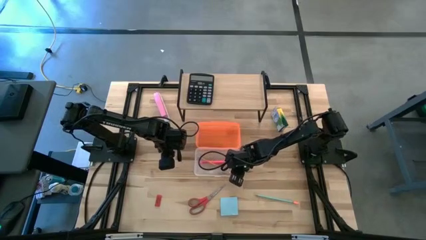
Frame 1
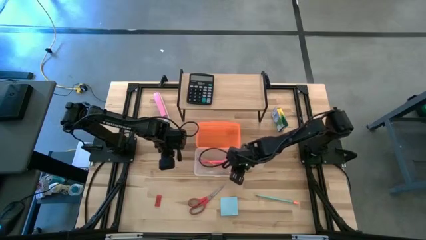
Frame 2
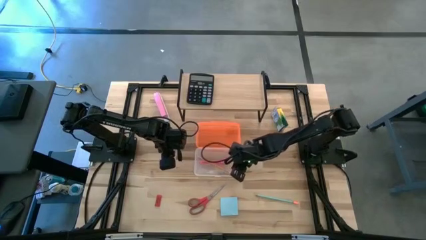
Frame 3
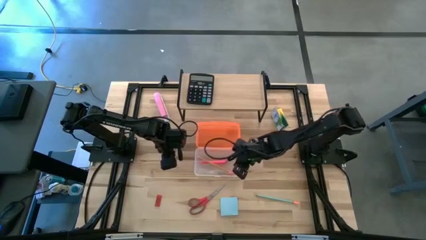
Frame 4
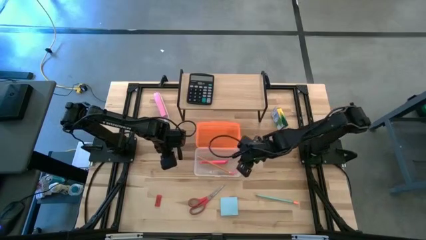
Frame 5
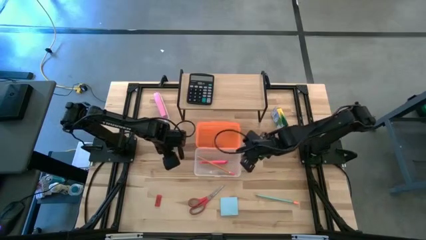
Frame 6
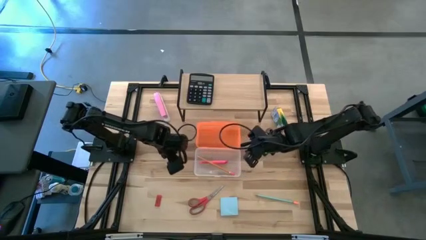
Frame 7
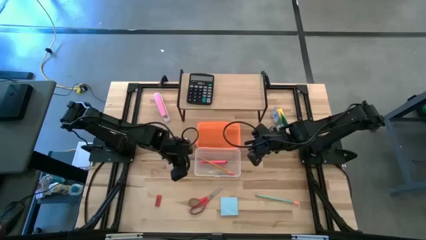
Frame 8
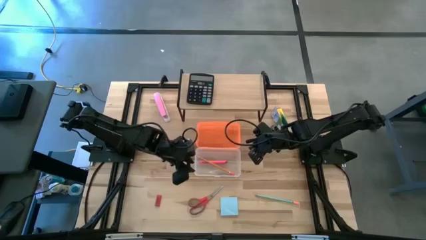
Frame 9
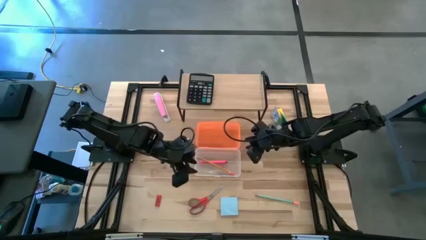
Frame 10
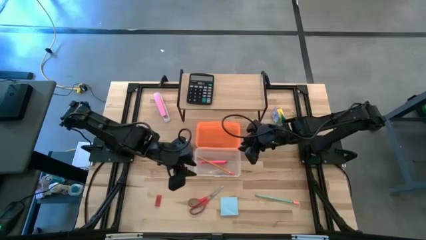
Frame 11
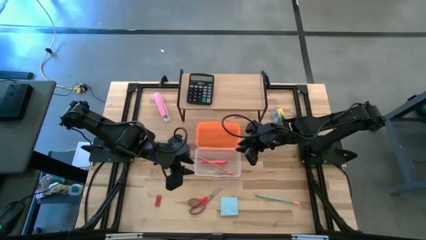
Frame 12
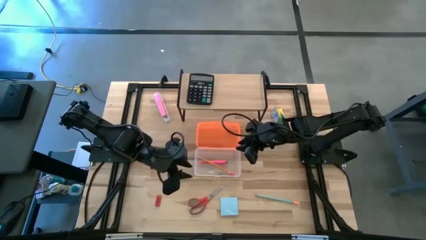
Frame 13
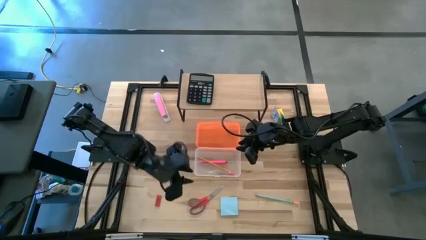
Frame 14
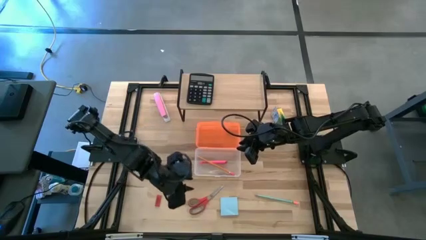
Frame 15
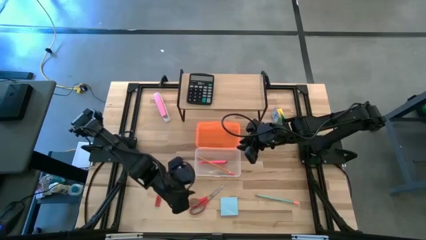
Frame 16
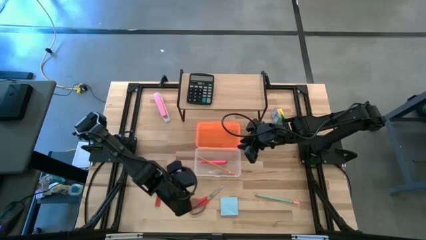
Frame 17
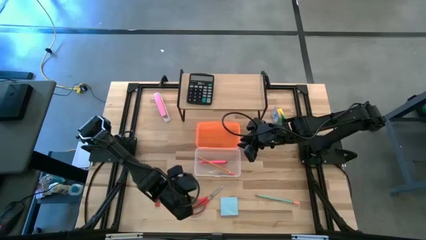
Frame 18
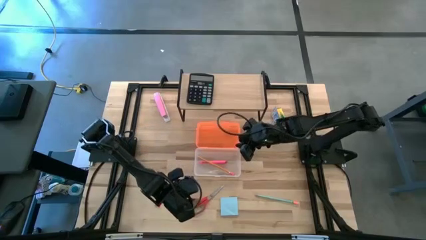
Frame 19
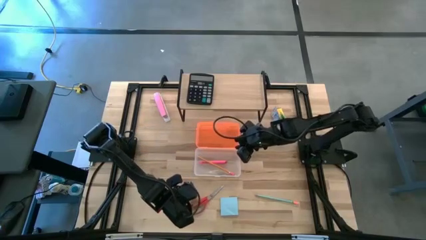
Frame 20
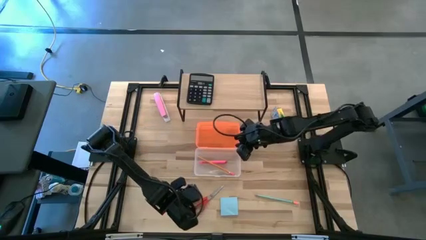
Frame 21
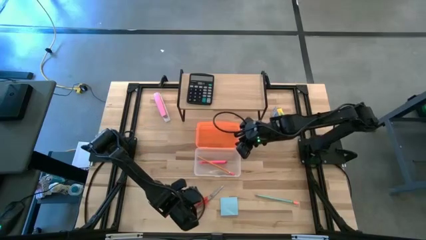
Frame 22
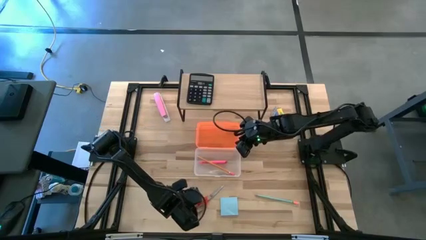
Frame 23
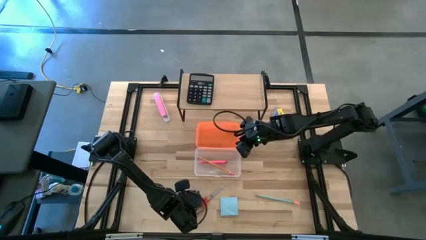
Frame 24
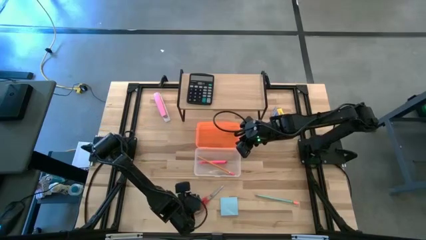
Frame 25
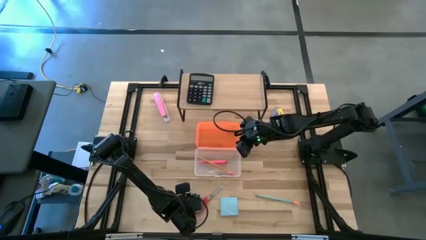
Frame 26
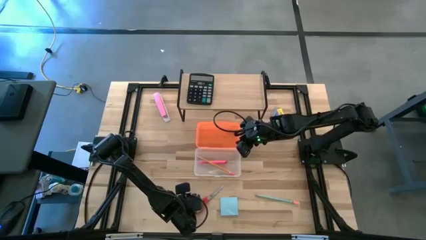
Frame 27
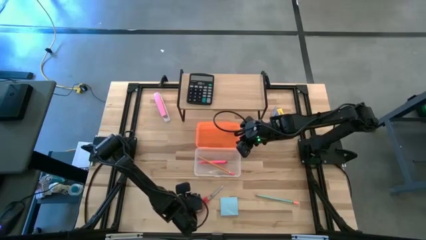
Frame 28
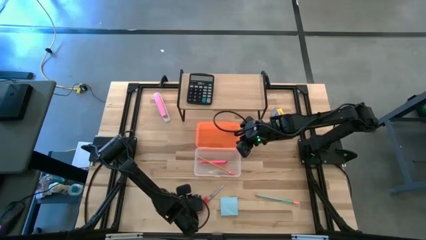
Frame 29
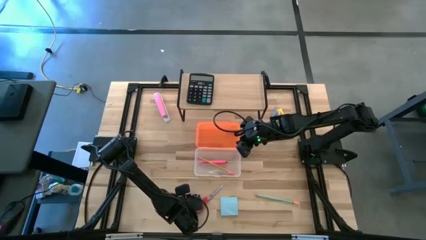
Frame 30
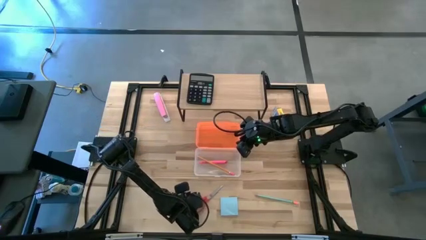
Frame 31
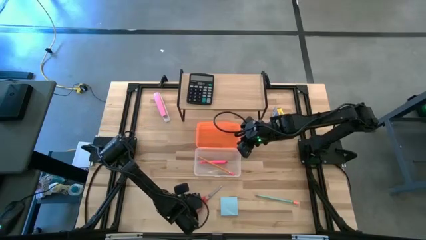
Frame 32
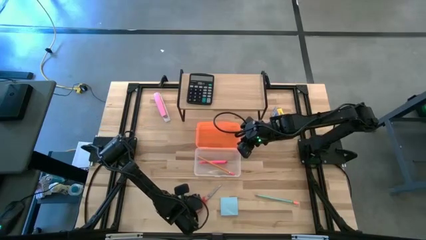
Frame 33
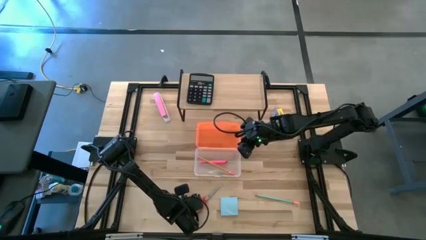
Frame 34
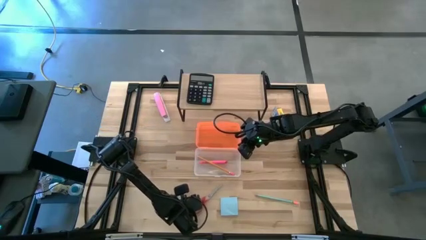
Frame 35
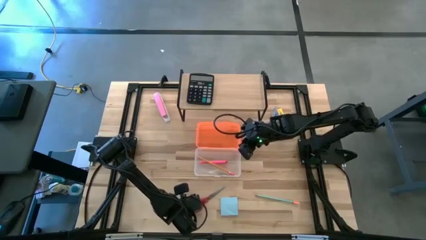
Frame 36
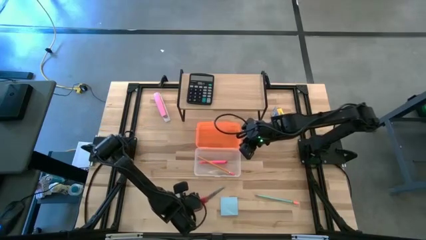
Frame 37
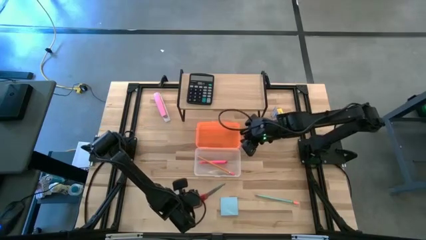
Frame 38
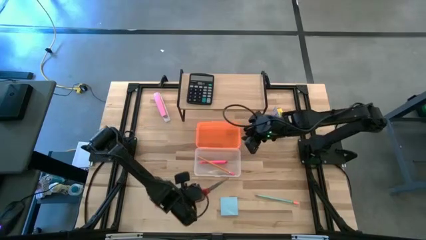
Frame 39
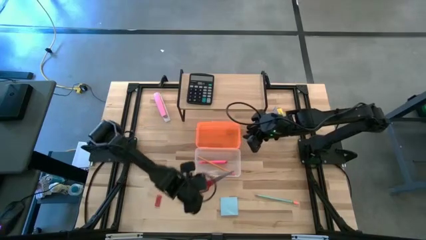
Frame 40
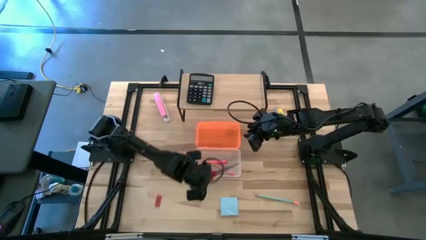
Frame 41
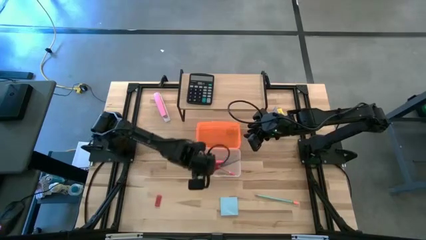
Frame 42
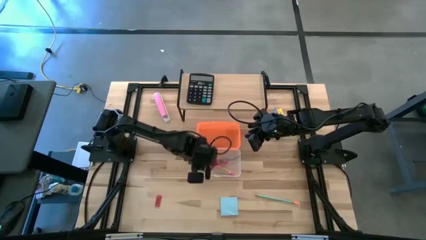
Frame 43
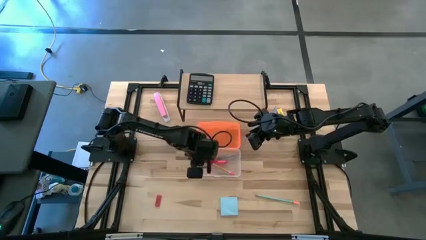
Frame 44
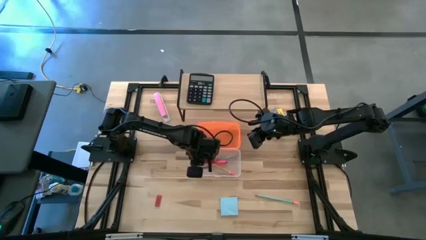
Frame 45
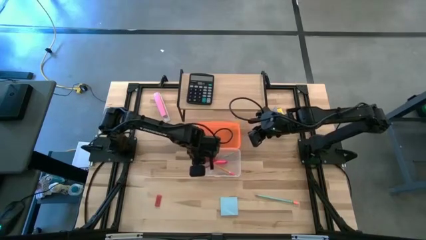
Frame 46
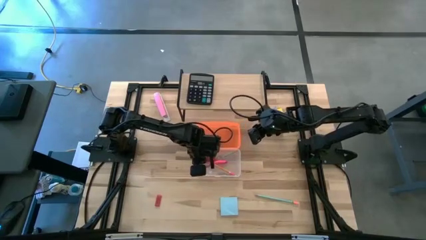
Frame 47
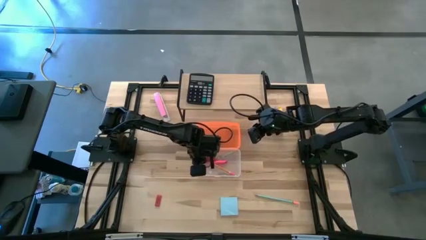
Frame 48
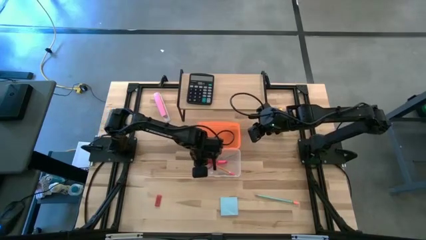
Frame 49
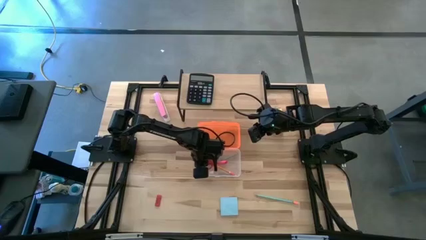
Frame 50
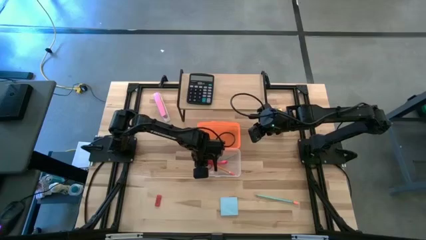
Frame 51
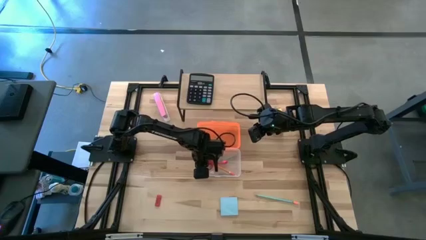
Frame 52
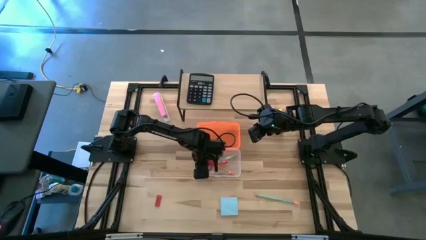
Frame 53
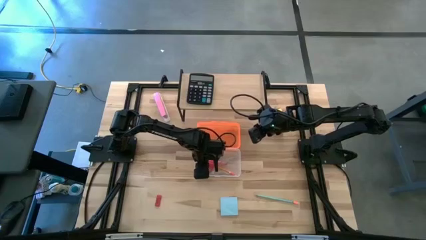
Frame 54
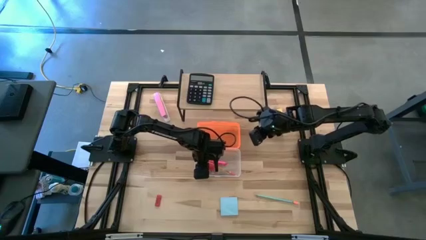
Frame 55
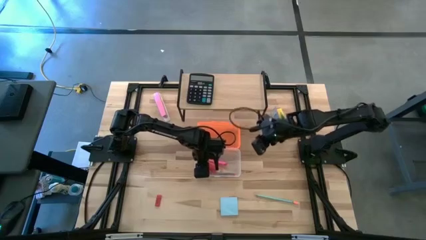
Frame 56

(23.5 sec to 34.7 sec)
Task: Pack school essentials
Put the orange scissor into the supply box

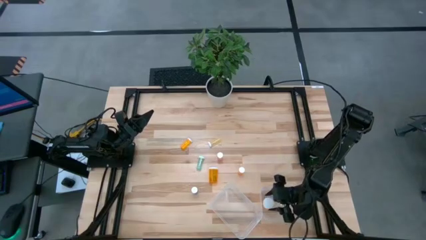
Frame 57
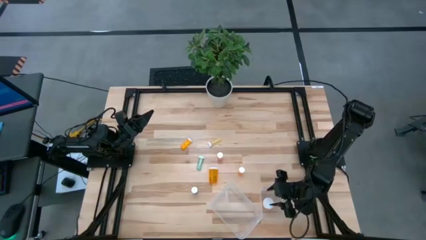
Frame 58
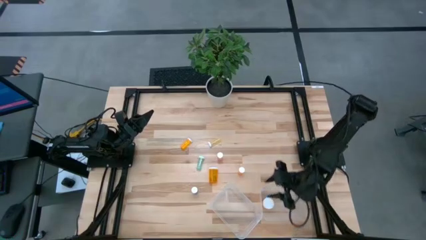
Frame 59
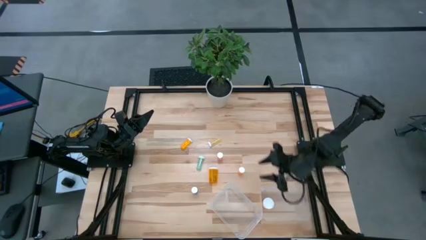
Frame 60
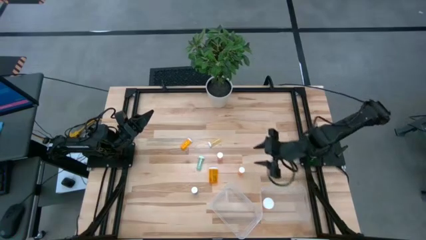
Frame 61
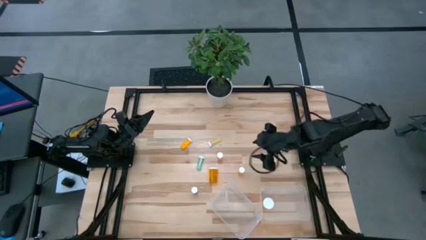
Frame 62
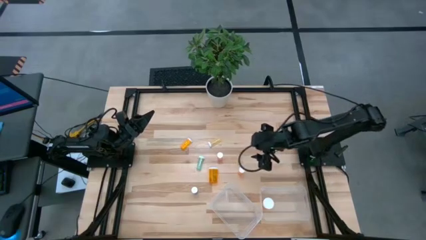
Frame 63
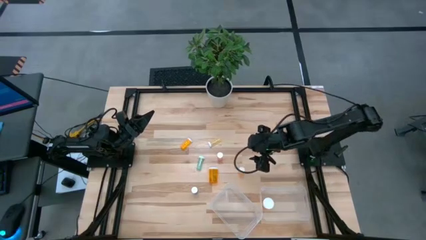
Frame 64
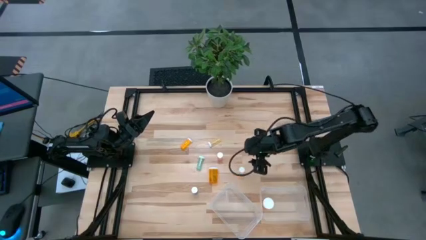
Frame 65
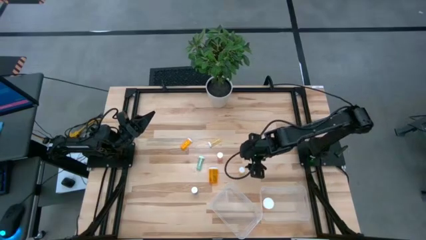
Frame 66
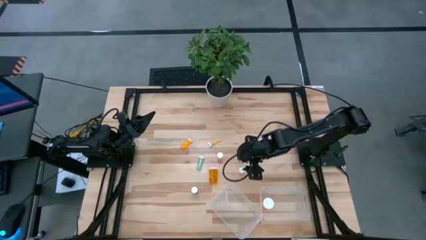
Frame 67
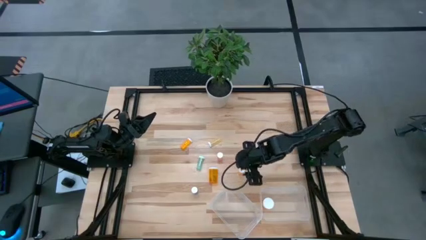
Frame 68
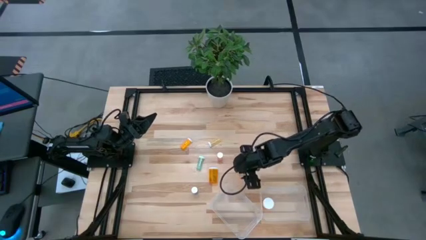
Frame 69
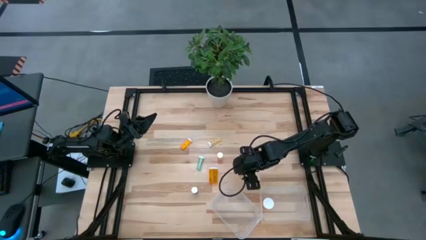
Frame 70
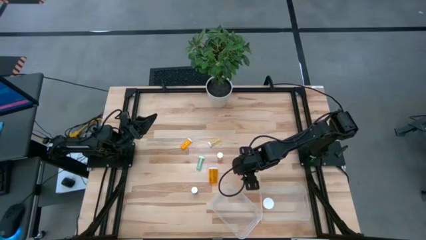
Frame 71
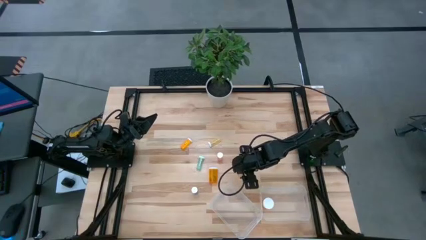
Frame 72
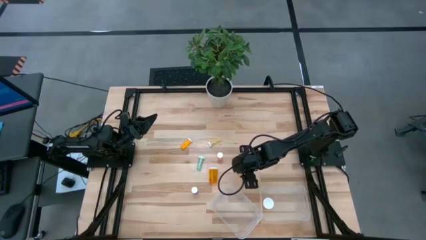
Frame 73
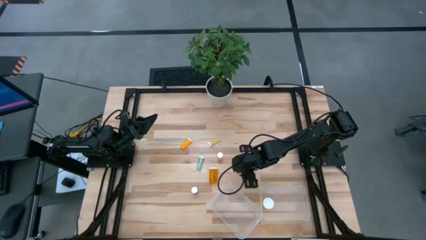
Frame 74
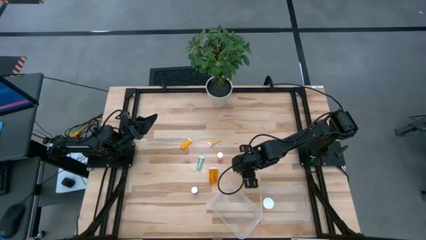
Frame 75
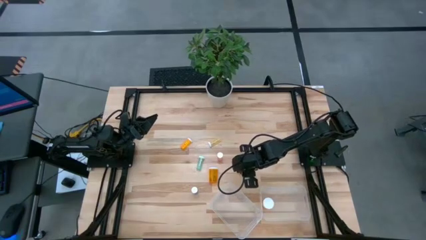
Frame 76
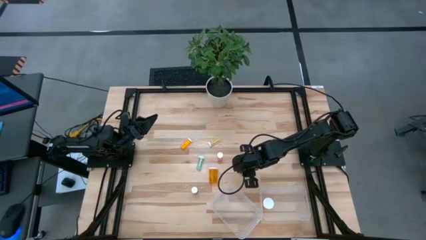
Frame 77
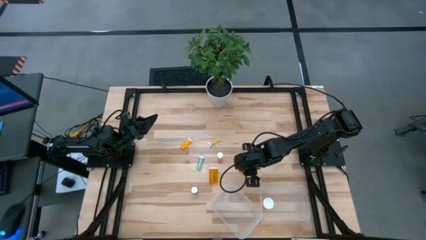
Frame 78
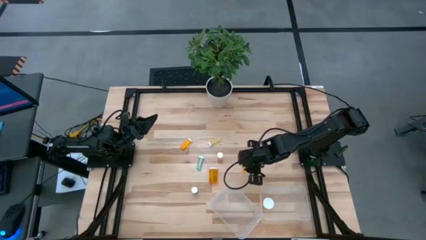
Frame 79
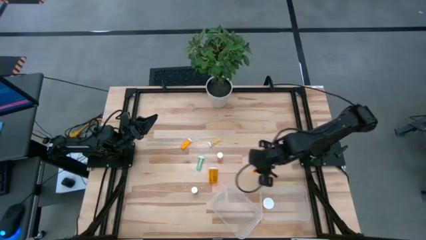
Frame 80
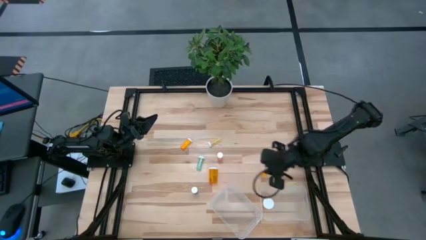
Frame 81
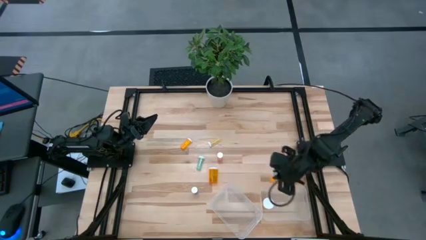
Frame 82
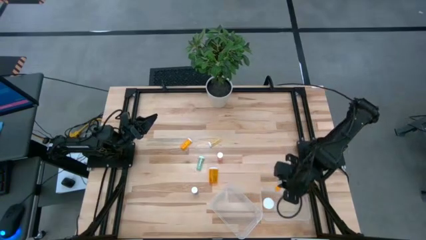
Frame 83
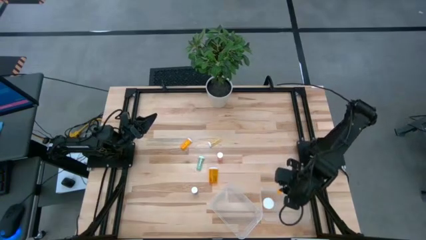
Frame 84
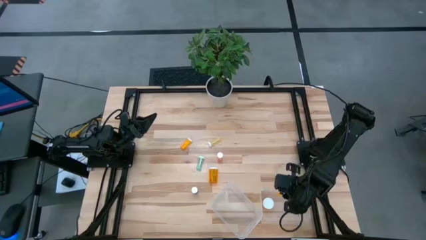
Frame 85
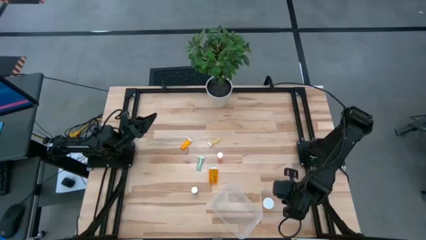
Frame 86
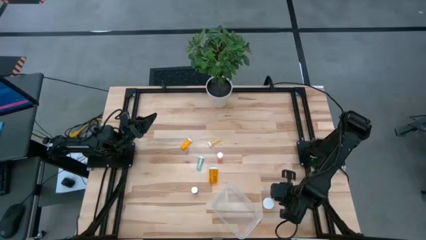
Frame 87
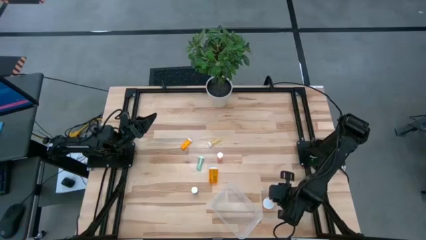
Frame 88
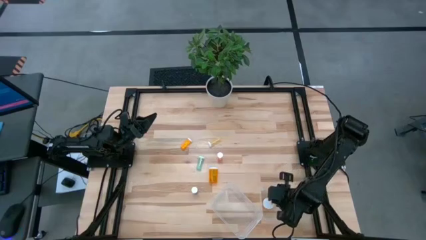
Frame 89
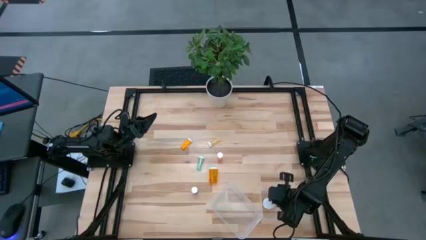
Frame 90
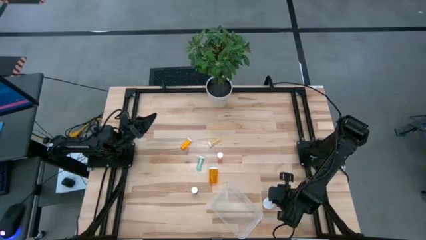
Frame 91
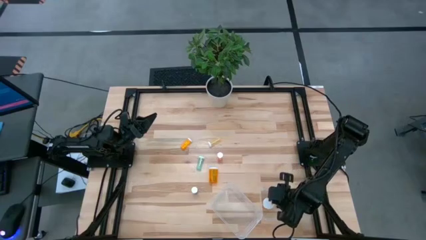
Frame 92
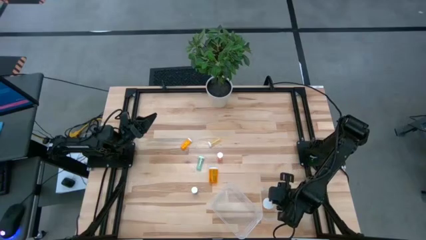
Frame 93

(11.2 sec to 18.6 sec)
Task: Pick and place medicine bottles into bin by pill shape (circle, oval)
Put the right small orange pill bottle into the right transparent bin
